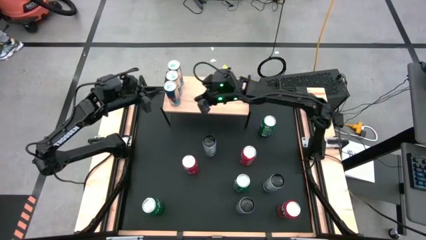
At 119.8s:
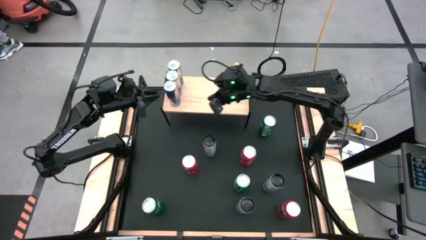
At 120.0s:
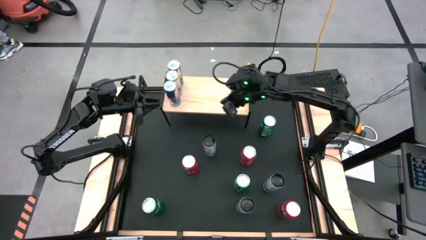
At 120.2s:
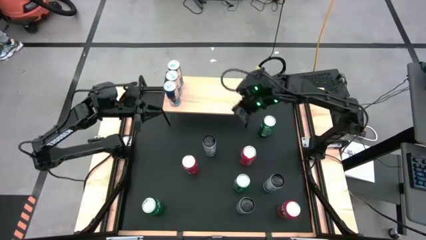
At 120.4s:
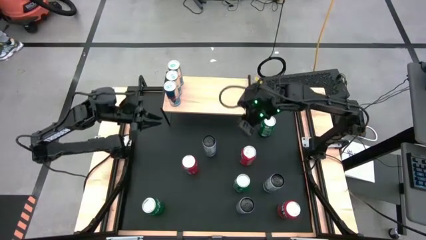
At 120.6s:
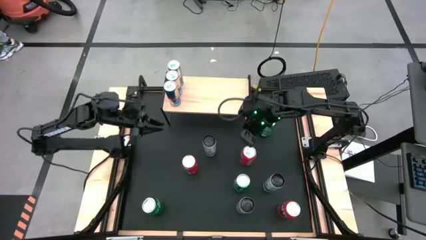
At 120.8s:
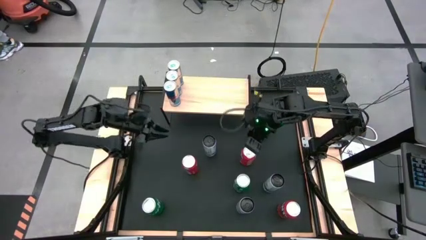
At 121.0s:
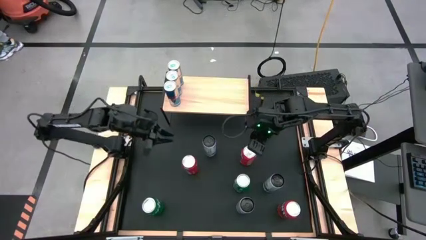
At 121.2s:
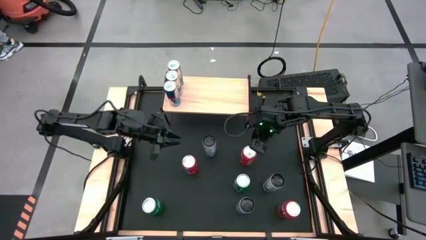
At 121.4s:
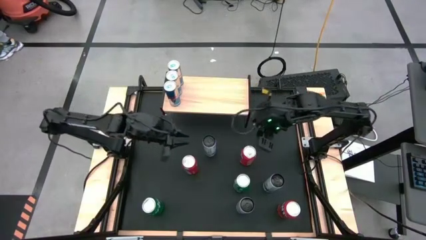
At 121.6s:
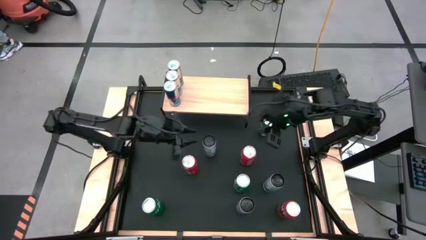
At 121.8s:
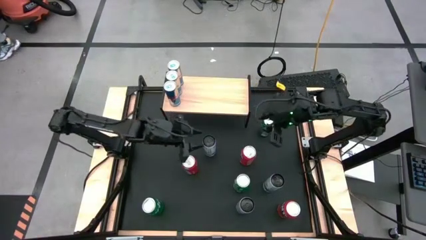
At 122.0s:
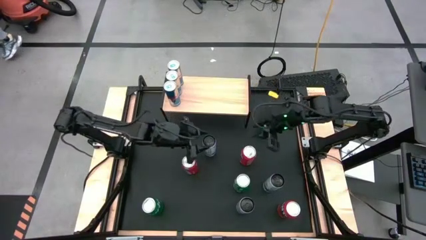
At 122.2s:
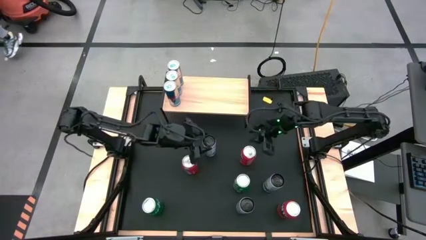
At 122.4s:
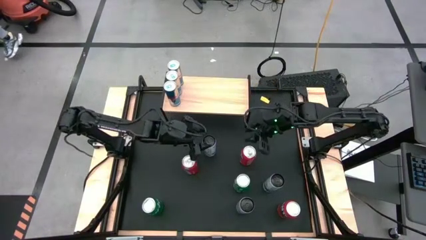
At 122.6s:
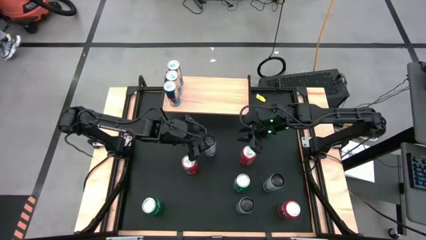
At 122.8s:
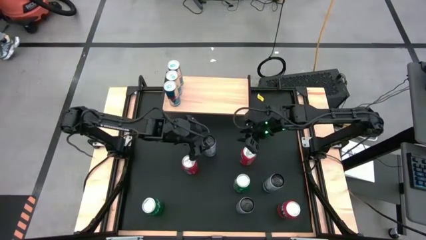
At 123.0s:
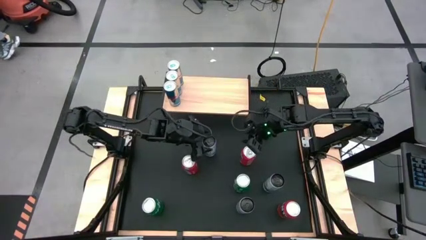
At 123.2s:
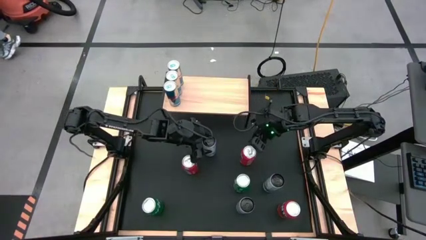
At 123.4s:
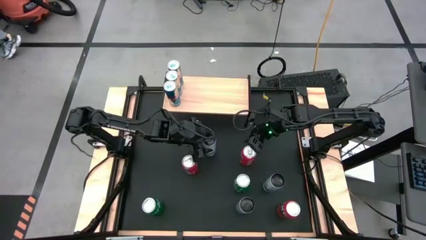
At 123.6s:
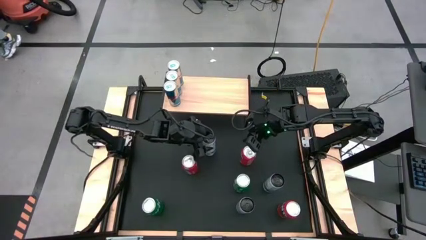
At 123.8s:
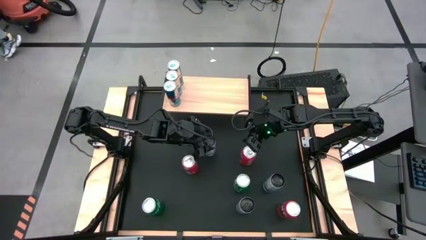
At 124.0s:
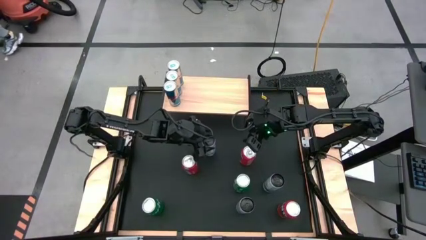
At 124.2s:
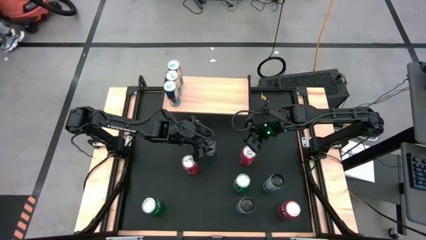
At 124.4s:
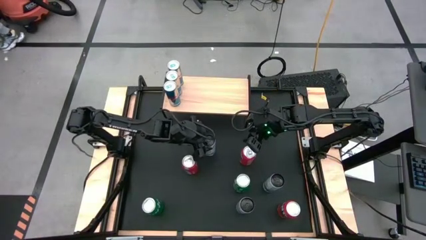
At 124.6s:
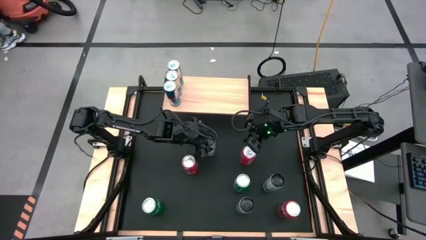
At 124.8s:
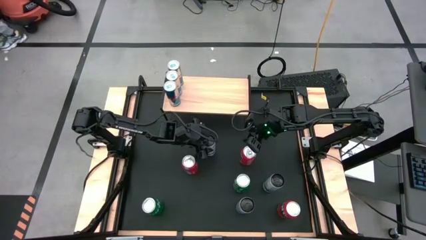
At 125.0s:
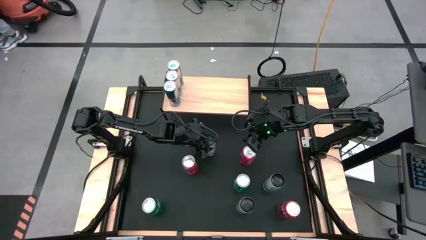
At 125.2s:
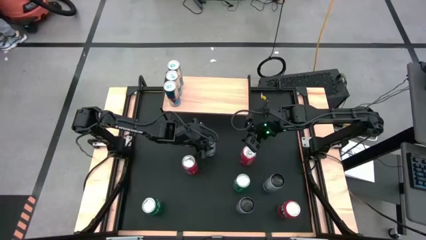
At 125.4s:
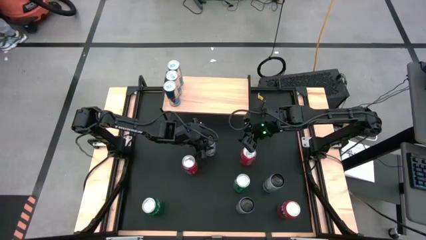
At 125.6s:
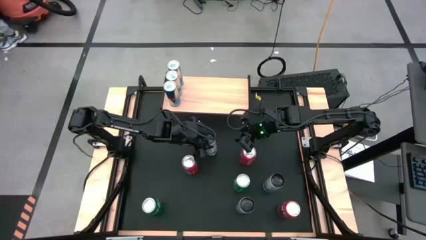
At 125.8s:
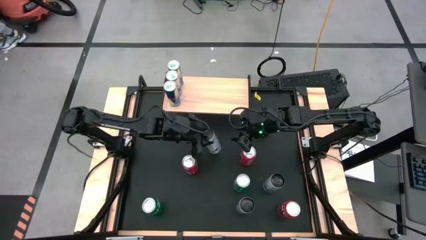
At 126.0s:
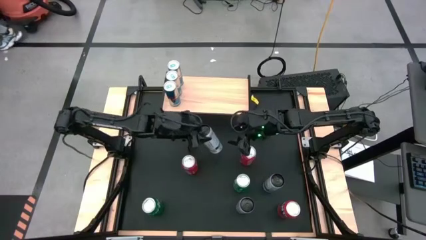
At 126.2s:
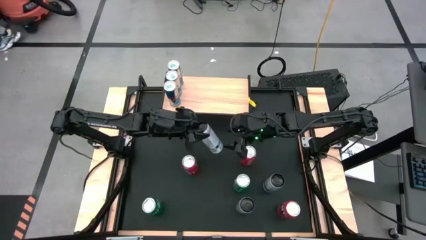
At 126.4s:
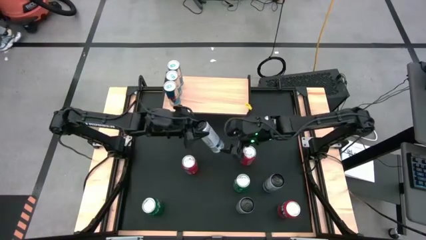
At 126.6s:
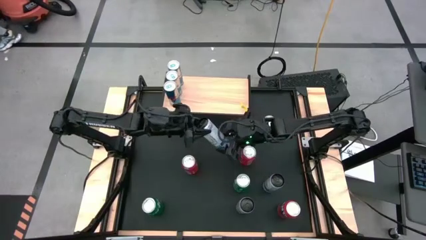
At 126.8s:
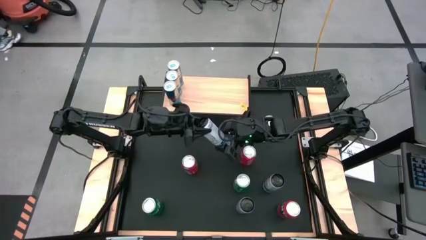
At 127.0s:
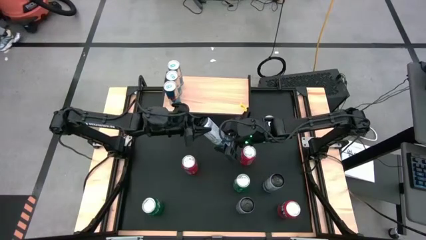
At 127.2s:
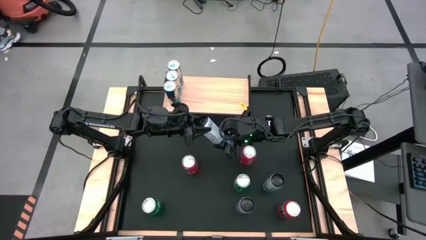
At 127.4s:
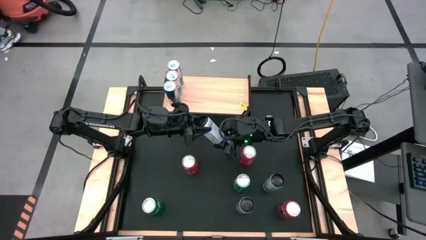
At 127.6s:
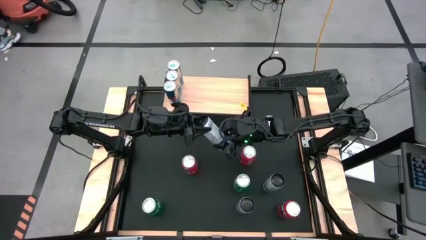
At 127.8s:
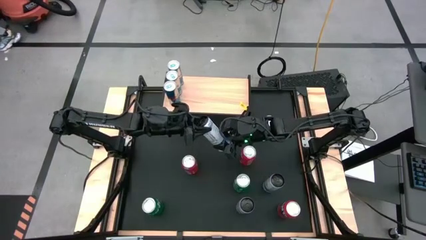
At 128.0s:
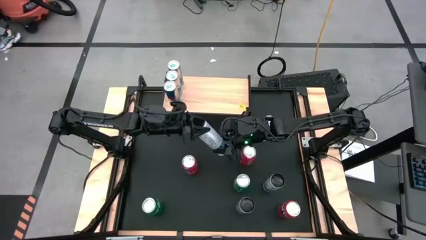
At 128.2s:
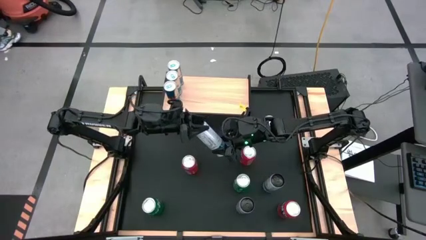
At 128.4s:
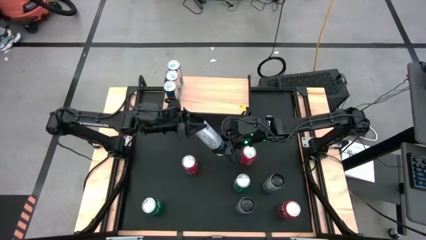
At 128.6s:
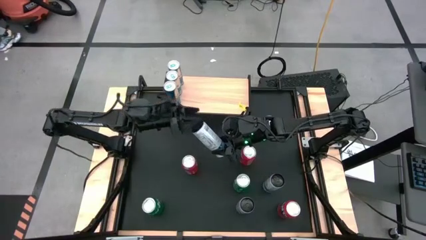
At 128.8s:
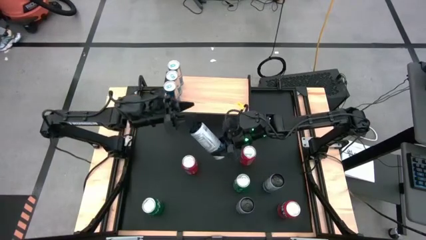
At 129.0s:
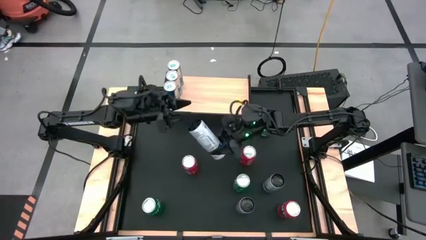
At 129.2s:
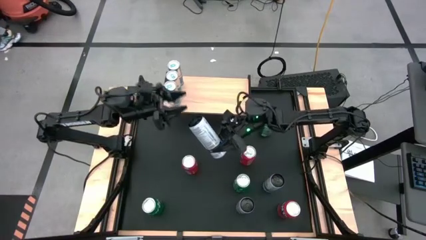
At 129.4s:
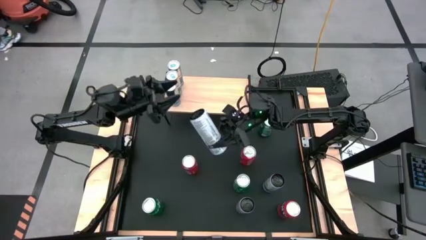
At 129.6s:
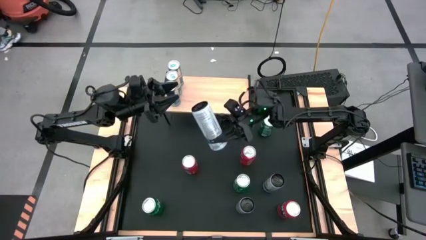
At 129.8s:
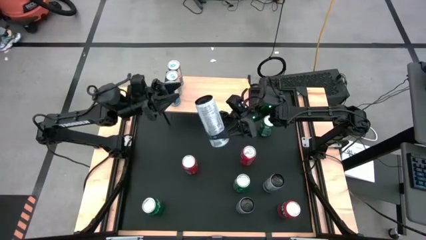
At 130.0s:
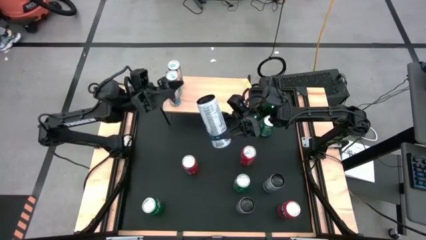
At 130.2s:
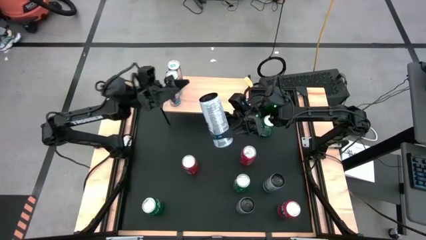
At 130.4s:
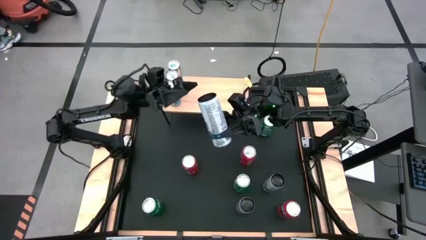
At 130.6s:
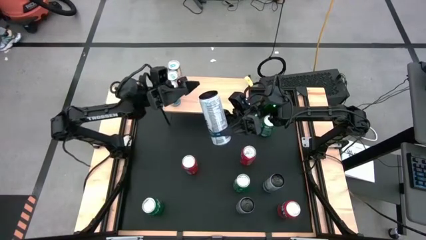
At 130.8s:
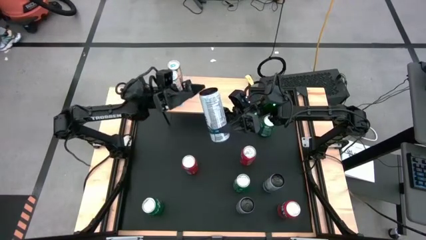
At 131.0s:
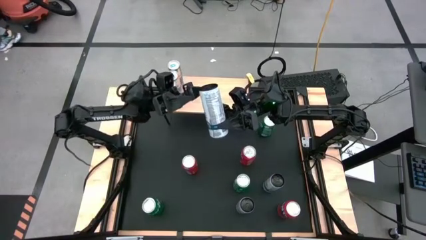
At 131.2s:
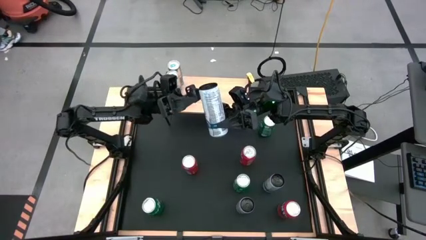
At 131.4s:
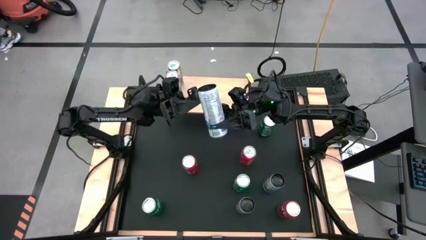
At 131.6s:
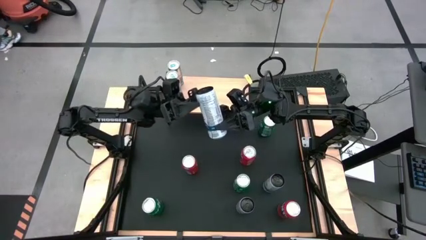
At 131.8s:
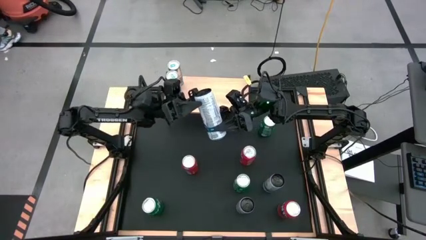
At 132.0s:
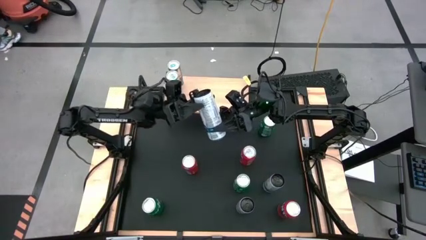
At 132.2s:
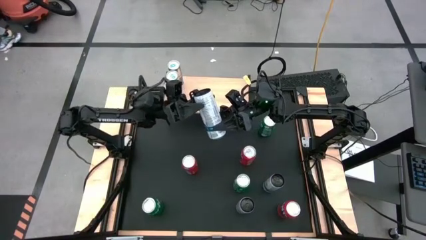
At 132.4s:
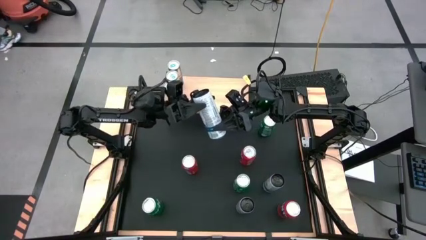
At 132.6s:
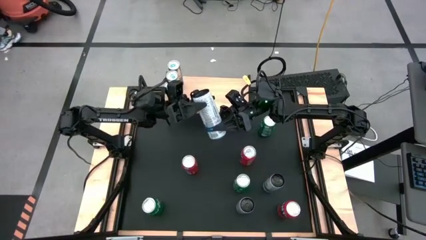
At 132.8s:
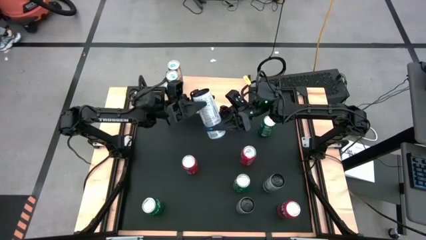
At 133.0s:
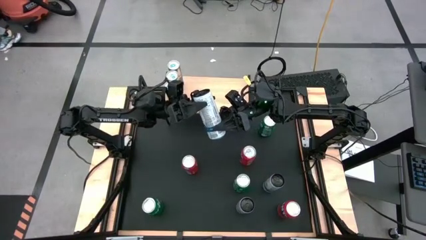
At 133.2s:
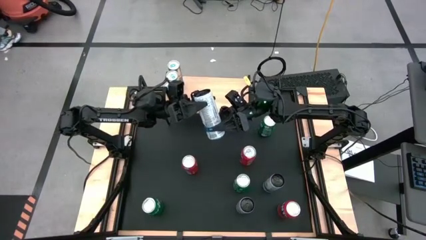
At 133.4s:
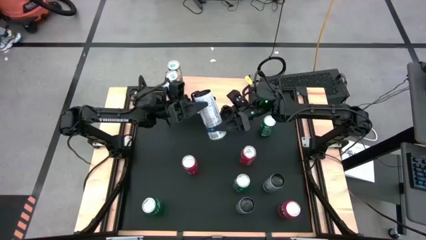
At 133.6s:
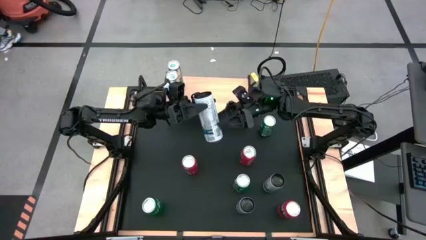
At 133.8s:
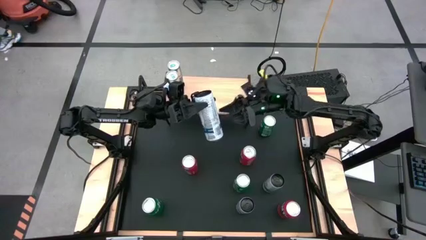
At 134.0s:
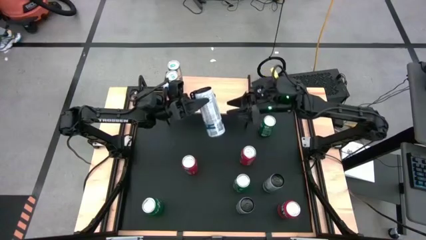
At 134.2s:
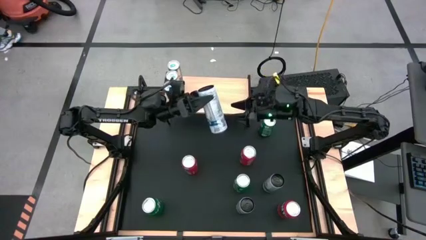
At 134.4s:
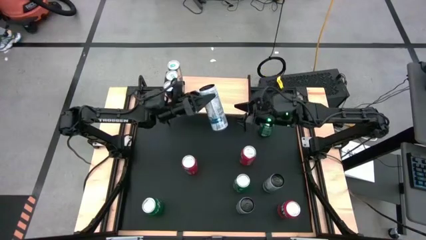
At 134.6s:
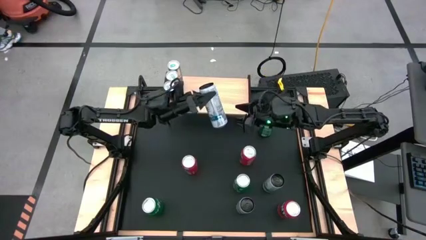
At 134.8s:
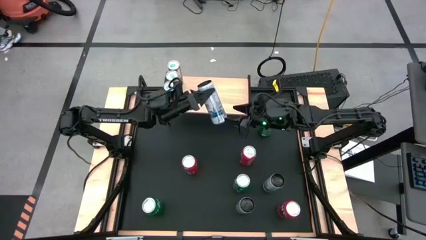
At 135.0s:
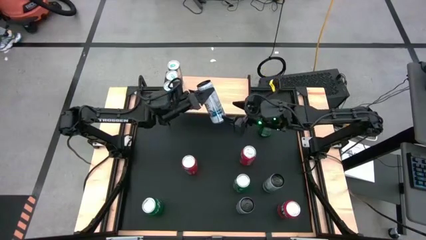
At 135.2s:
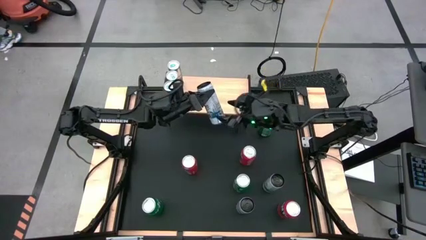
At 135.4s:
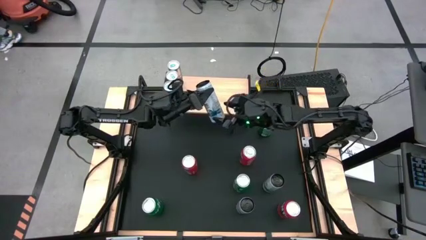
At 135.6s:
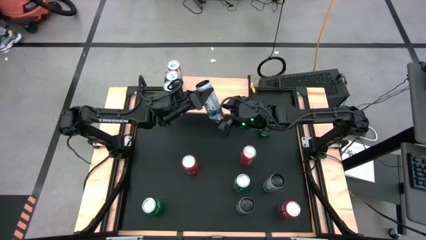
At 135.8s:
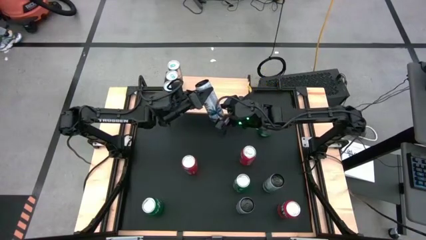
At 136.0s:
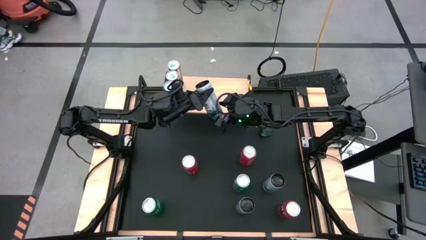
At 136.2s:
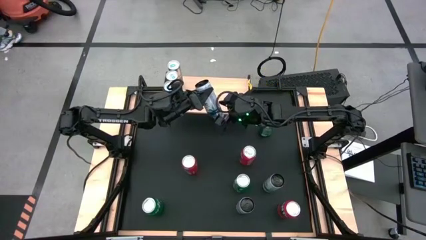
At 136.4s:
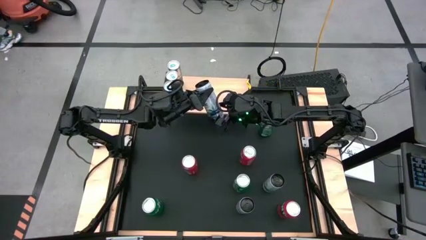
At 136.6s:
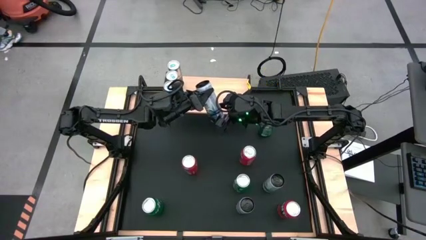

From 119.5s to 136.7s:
Task: Place canned beverage on shelf
Put the top white-blue soda can on the shelf
